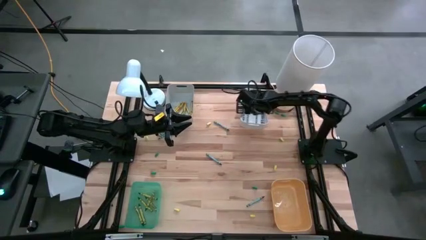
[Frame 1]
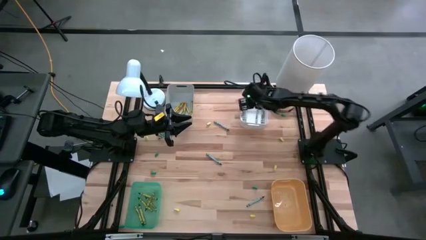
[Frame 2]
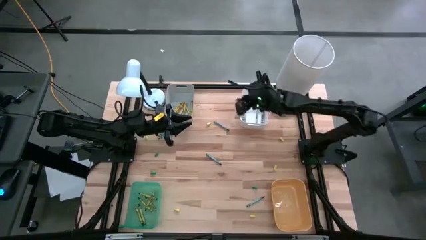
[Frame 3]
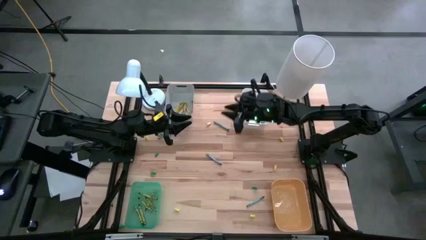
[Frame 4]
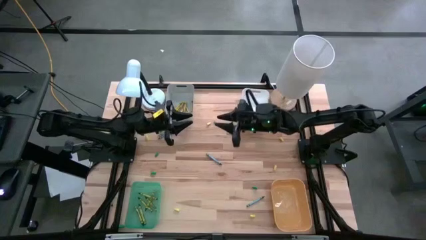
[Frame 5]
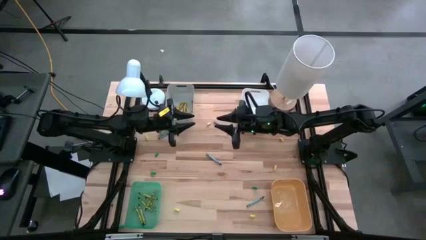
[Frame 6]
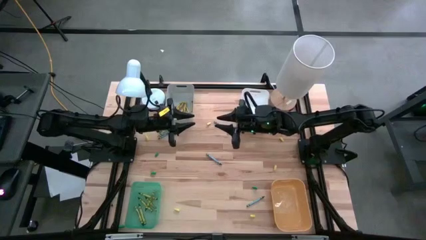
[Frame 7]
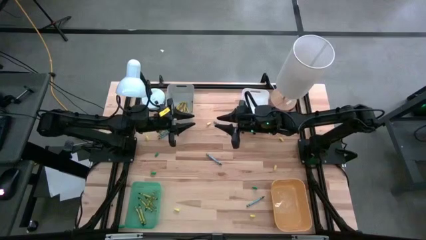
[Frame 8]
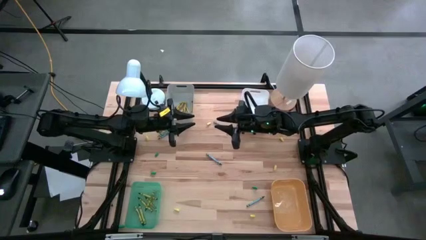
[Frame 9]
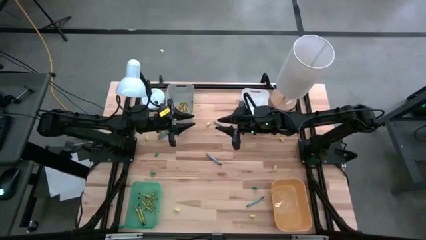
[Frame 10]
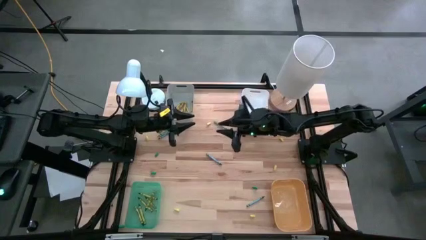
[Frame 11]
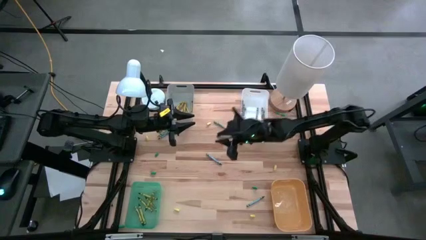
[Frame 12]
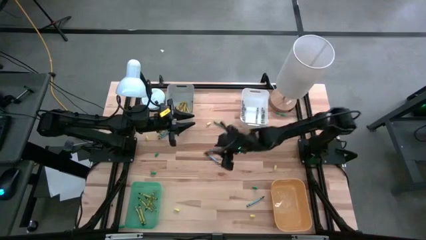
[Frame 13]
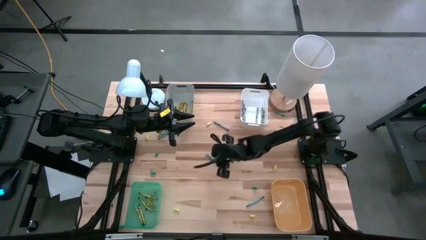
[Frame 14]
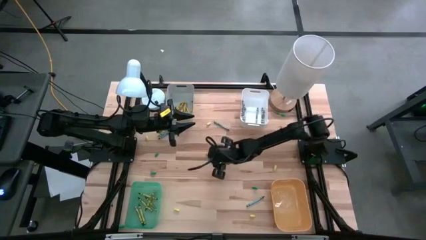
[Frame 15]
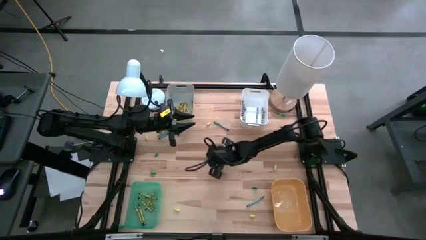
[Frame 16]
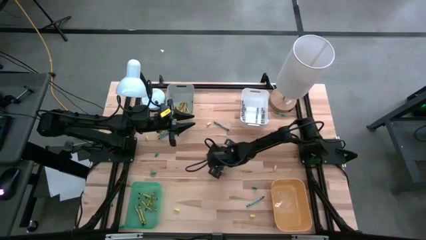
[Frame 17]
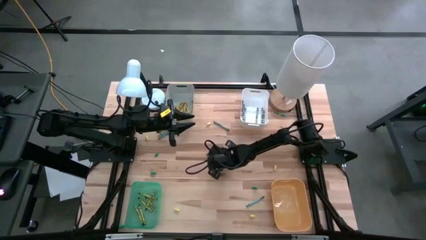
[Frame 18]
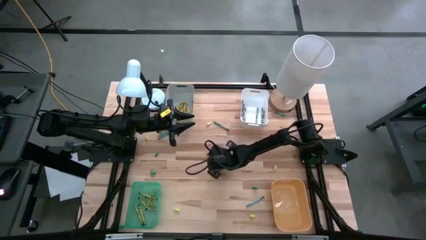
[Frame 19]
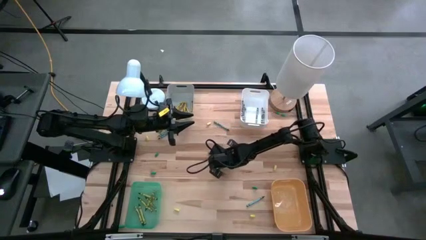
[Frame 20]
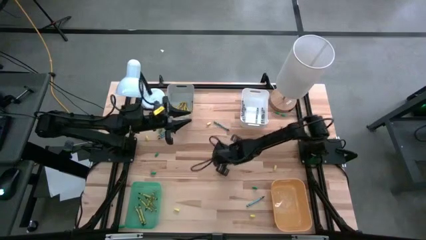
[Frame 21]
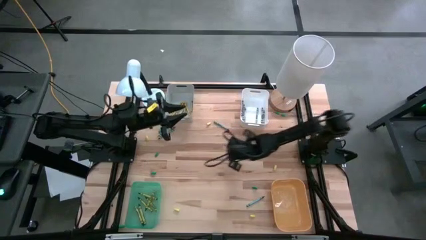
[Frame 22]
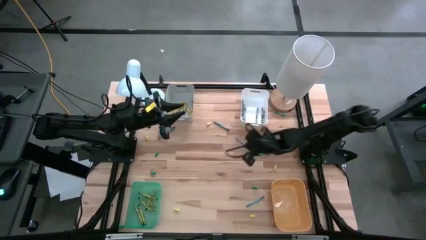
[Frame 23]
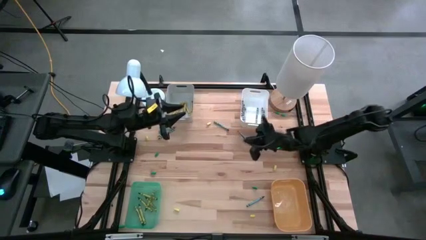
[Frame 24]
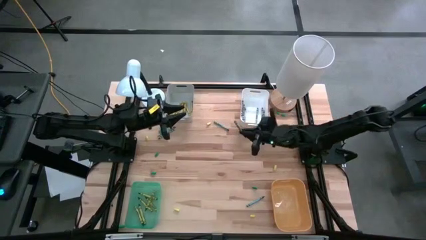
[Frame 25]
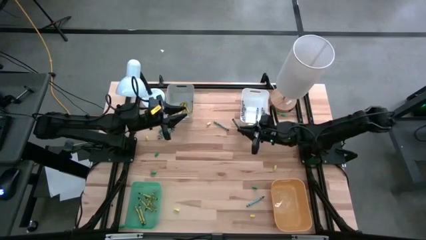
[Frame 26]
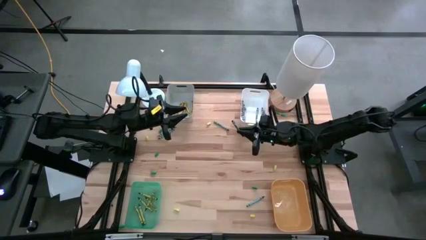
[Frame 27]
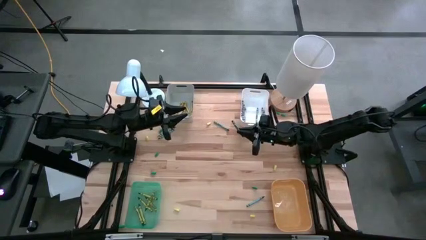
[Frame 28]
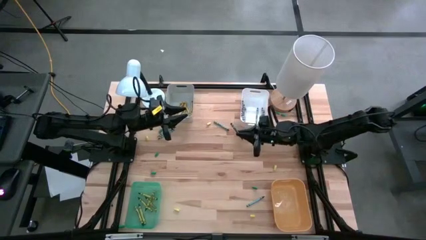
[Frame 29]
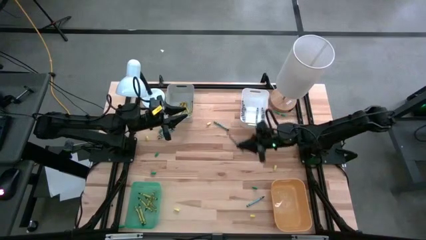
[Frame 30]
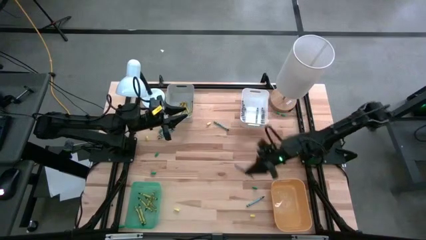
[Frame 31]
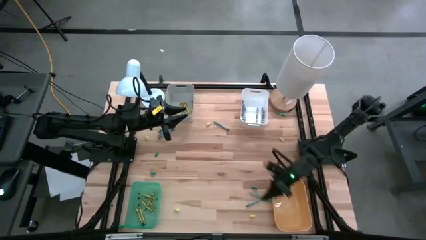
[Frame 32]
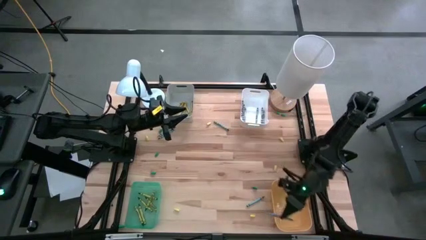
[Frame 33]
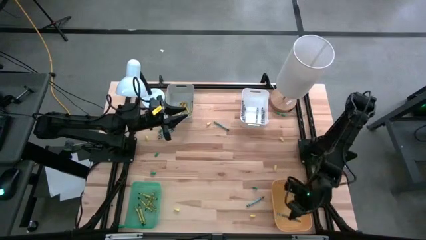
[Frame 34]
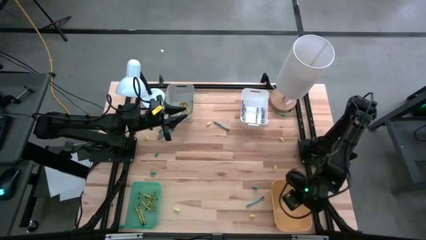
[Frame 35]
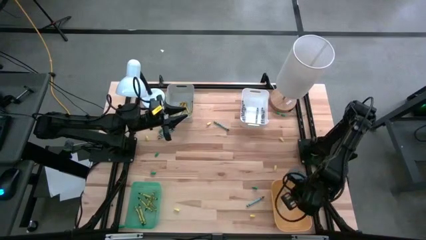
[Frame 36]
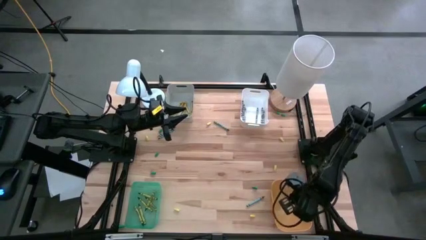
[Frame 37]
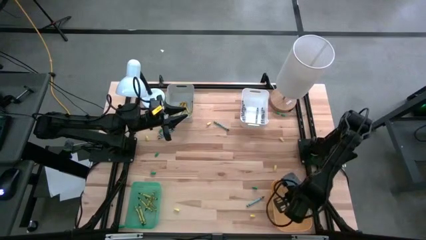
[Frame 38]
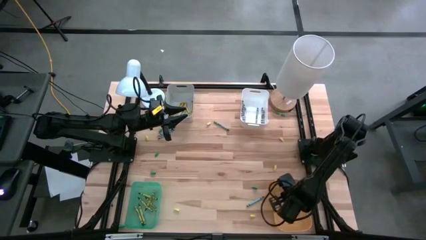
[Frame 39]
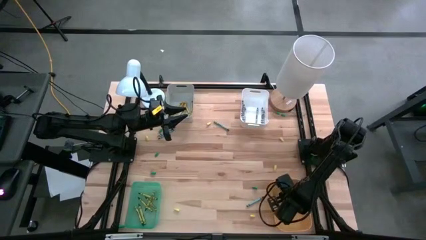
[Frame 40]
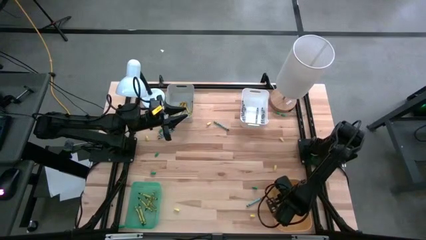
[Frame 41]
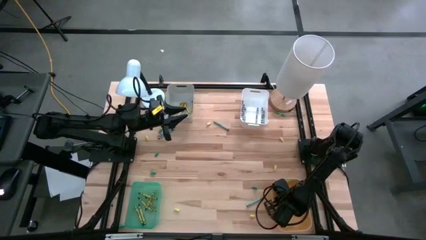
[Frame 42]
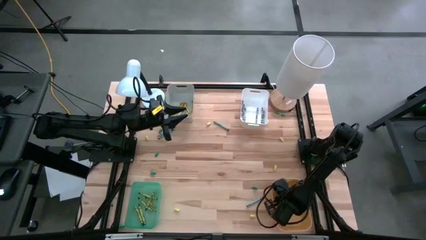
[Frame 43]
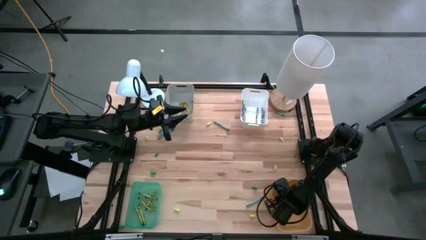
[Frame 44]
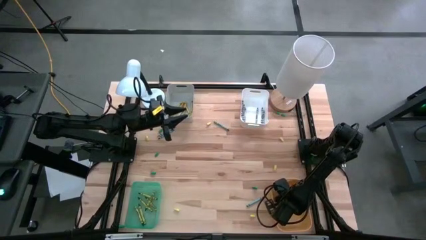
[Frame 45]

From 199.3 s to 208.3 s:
Task: Sort crayons
Put the blue crayon into the yellow bin

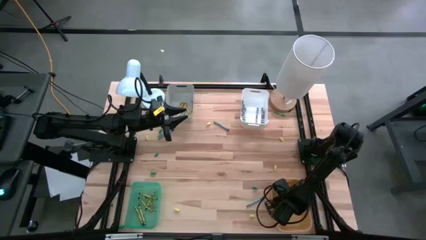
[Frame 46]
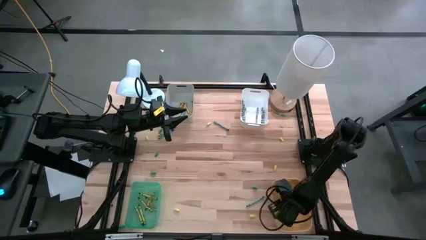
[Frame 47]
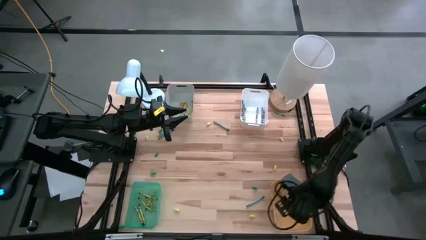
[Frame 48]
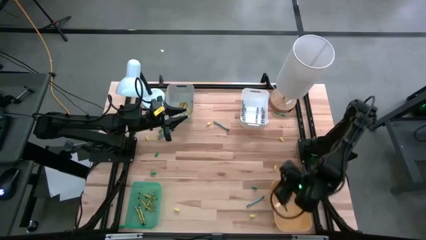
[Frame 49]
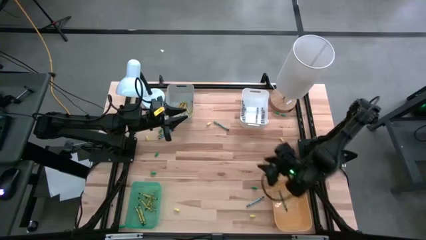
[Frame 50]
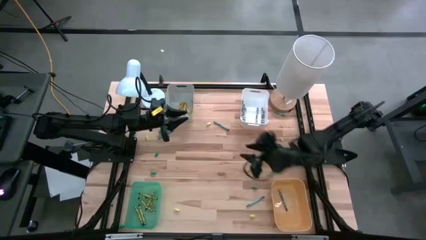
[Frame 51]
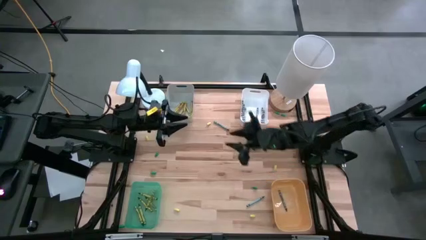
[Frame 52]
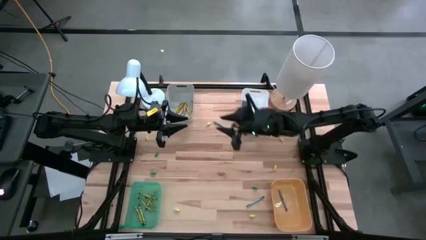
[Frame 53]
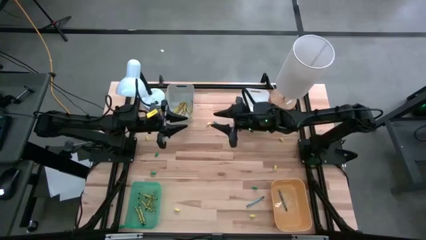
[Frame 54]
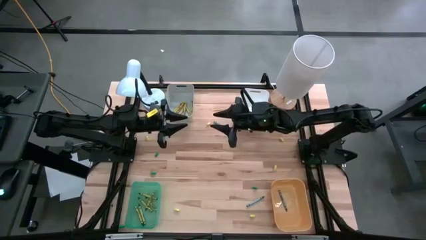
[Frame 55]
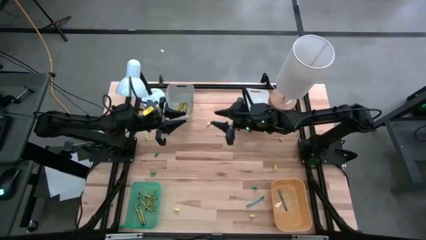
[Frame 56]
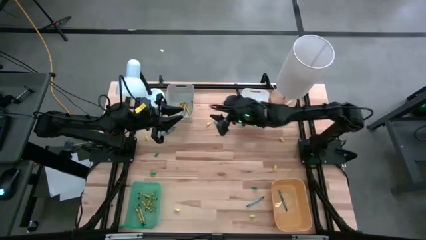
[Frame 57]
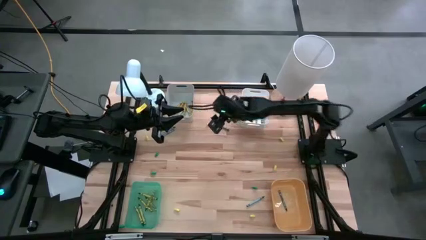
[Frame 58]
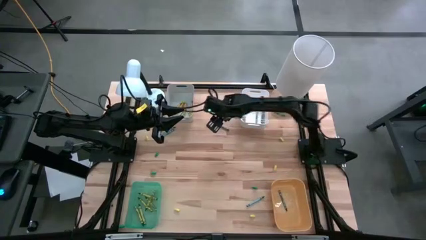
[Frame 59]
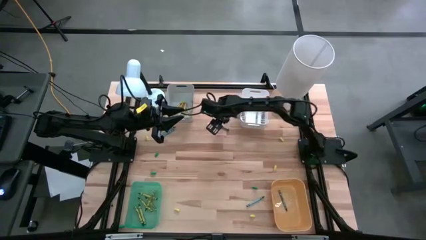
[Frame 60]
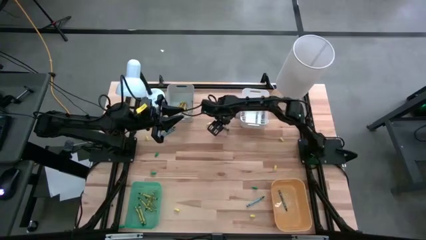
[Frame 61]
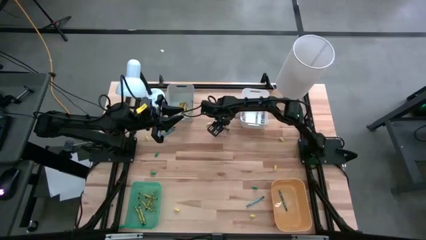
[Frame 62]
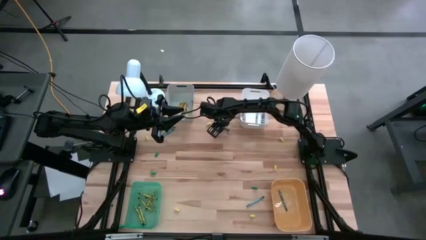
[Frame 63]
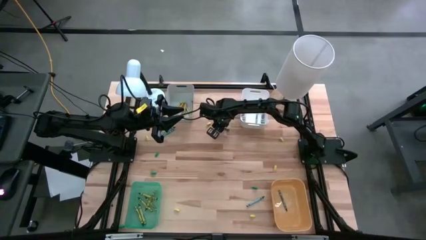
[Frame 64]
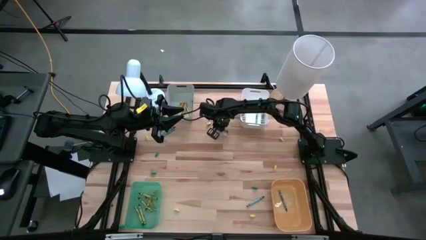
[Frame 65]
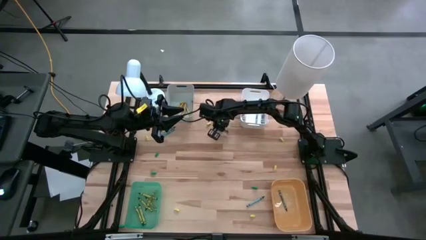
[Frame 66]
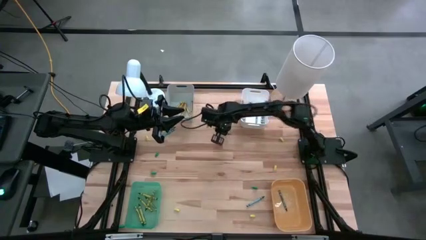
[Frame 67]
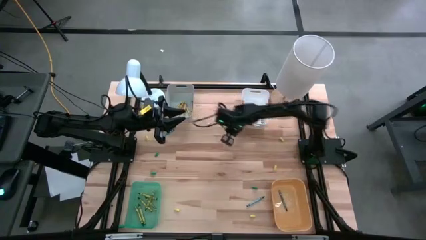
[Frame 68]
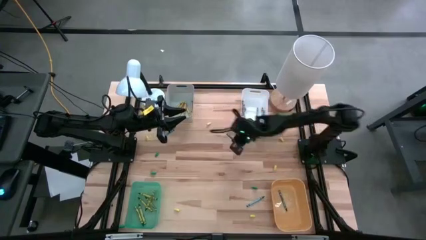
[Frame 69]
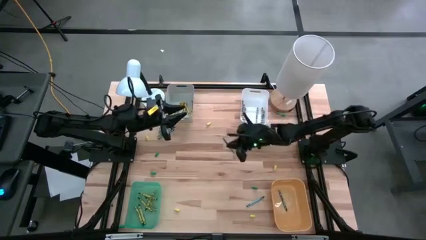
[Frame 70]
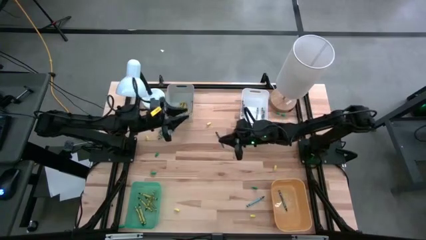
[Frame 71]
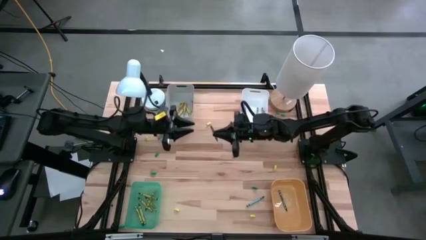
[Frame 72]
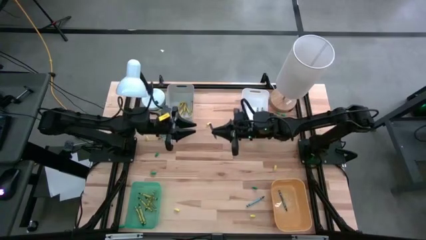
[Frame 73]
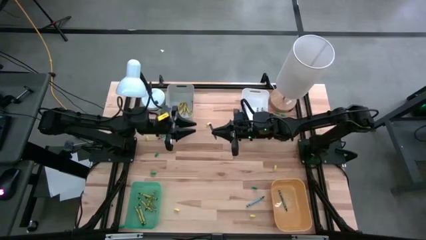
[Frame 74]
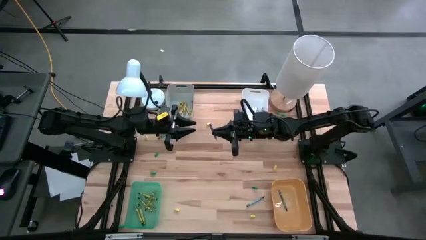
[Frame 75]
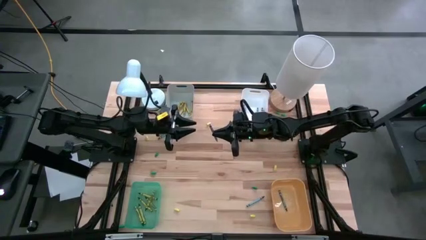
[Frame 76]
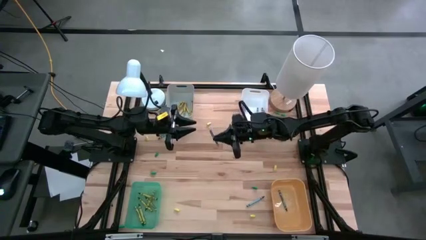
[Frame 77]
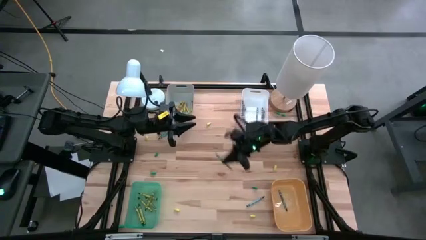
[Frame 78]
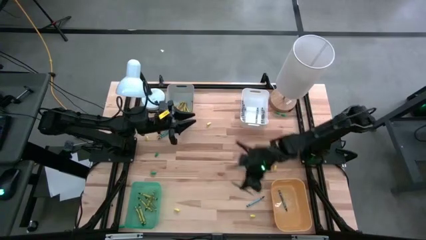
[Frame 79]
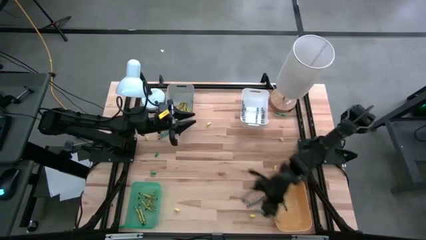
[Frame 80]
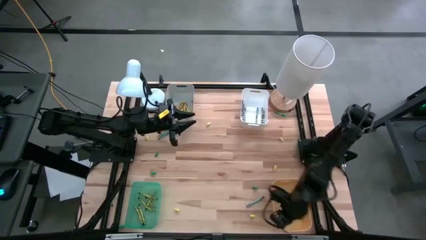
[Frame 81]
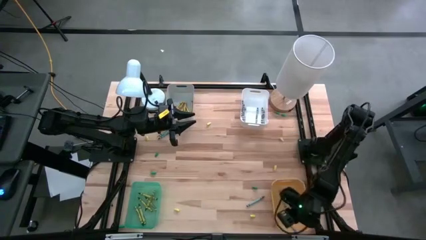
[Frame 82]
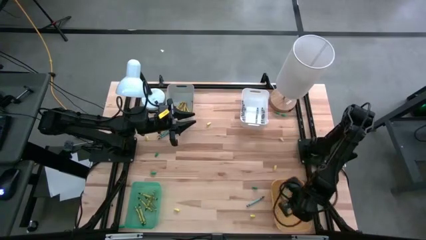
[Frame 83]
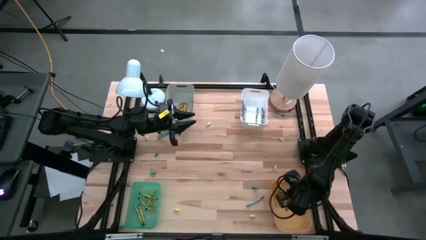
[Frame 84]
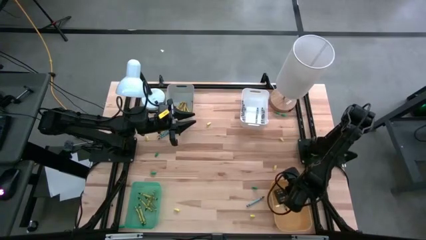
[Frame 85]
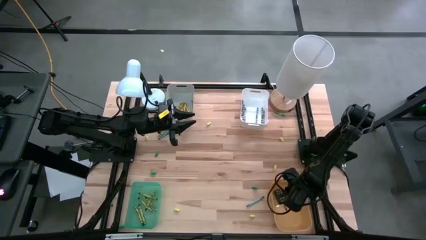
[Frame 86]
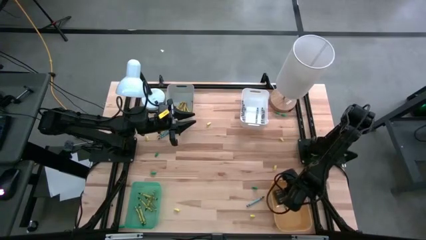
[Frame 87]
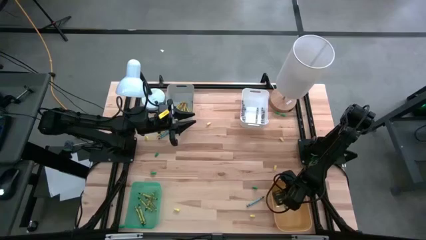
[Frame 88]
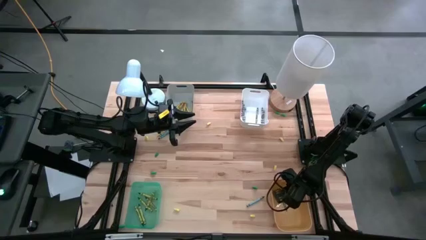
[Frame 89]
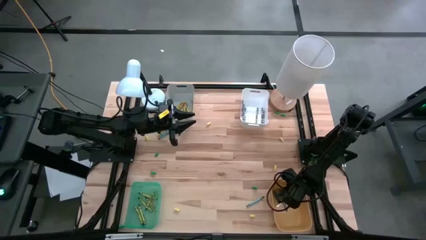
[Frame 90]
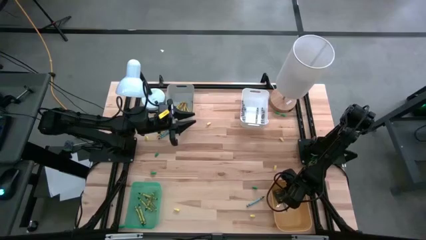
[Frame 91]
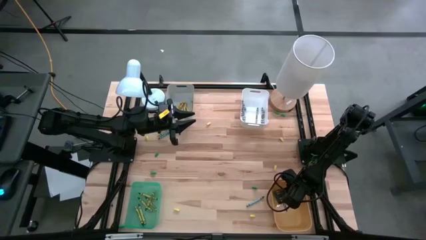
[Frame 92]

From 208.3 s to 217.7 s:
Put the blue crayon into the yellow bin
